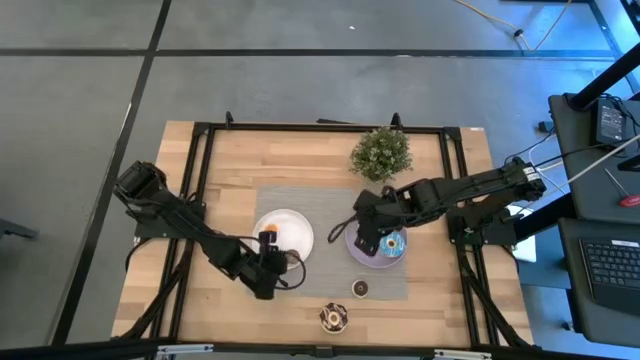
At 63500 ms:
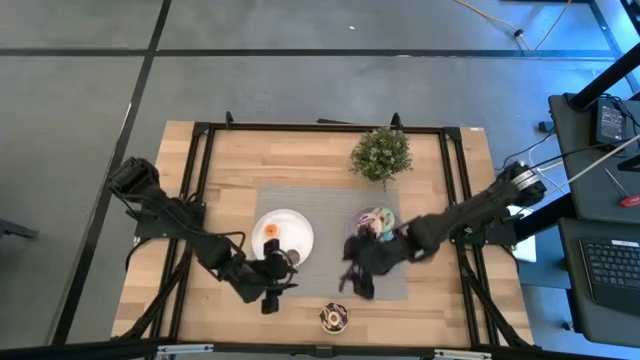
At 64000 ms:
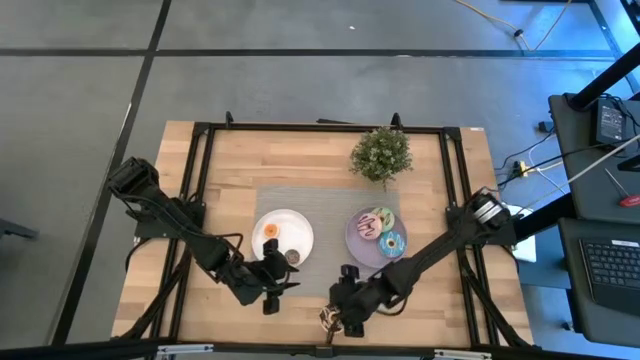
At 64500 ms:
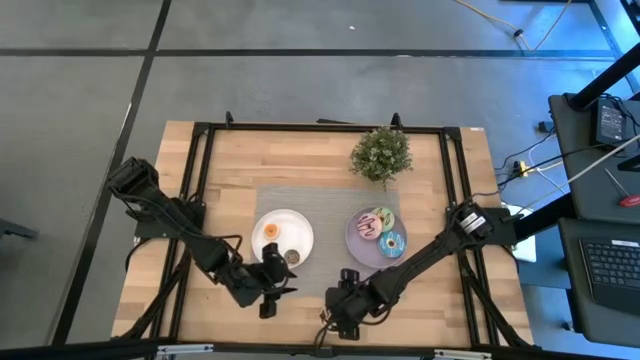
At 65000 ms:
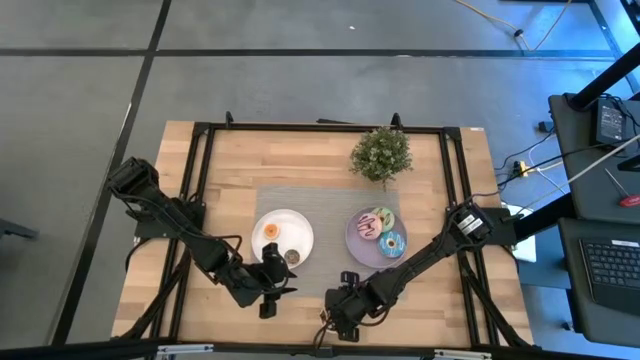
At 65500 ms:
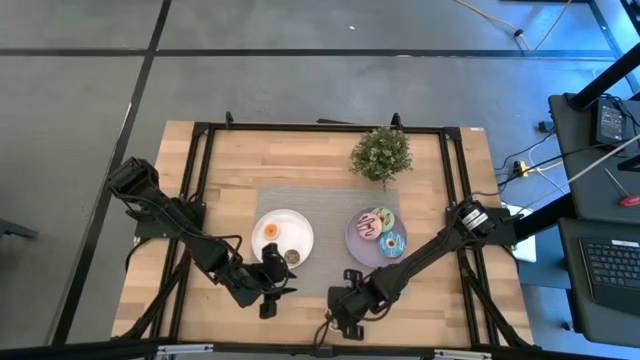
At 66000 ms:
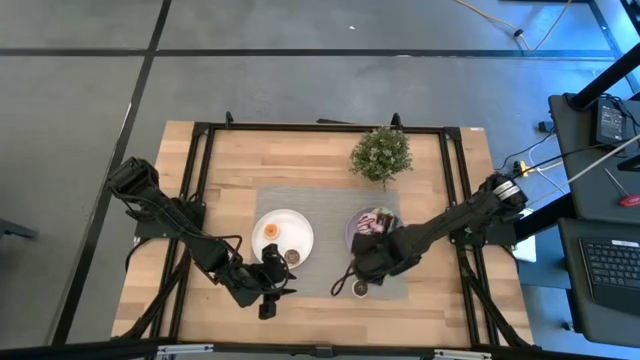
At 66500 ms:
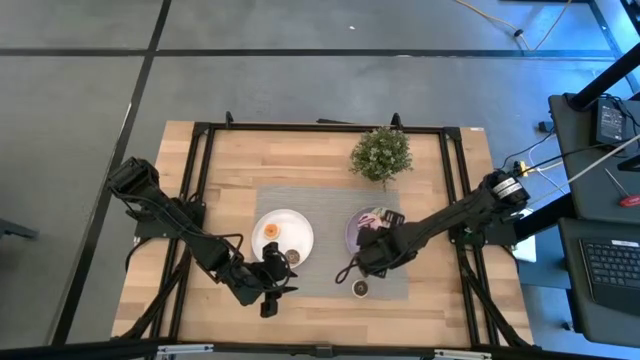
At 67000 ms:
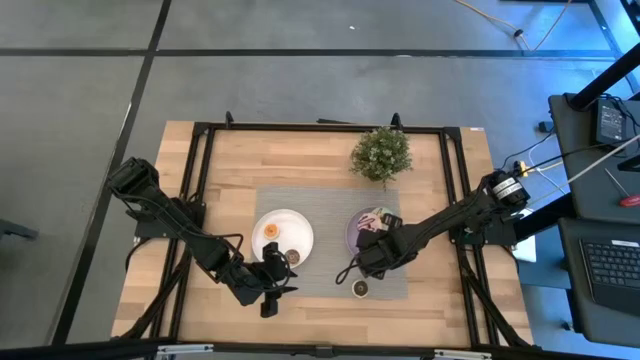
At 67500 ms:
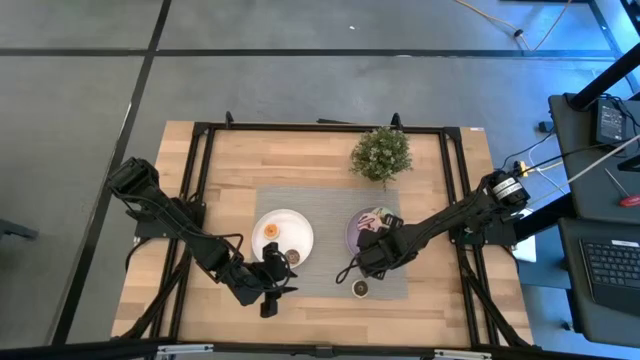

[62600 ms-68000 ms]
Task: Pick & Place donuts
Put the big black donut on the purple plate

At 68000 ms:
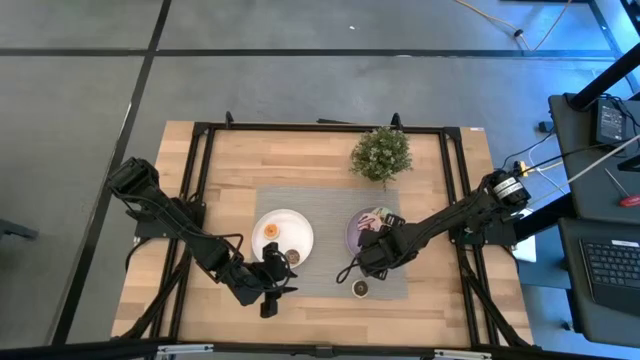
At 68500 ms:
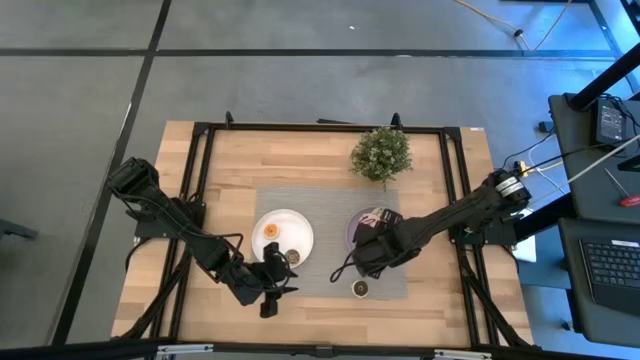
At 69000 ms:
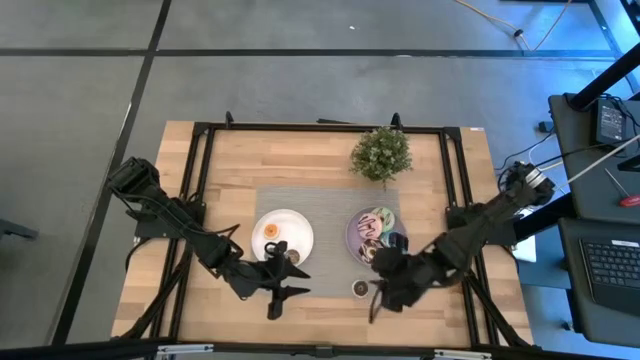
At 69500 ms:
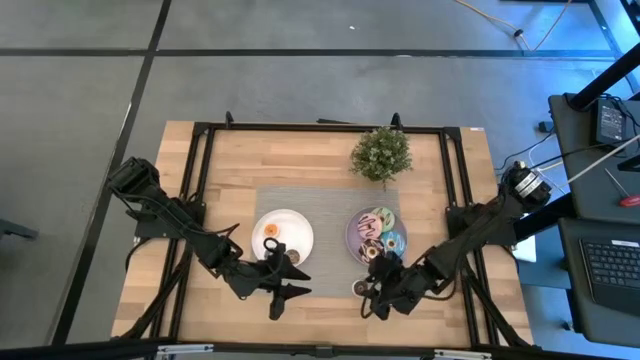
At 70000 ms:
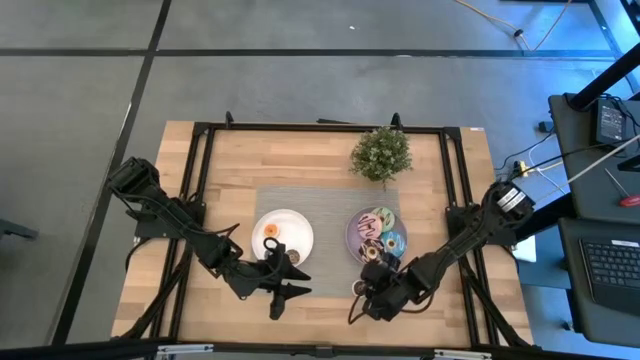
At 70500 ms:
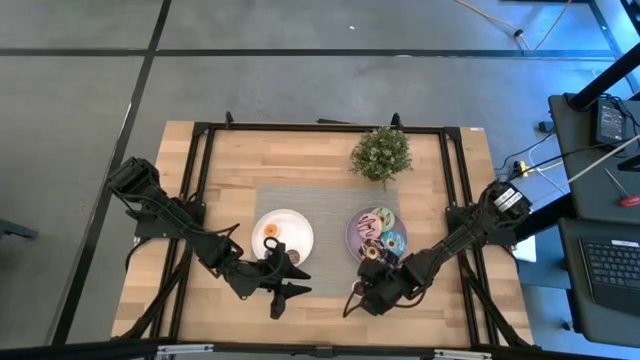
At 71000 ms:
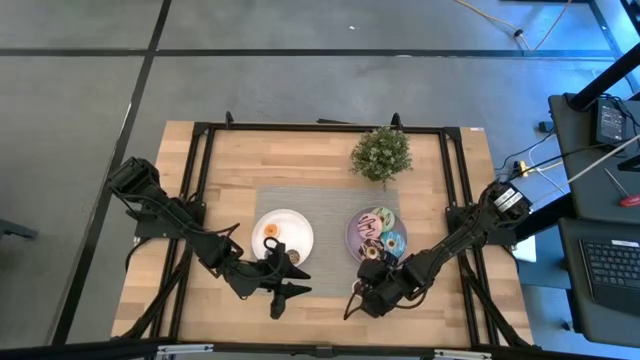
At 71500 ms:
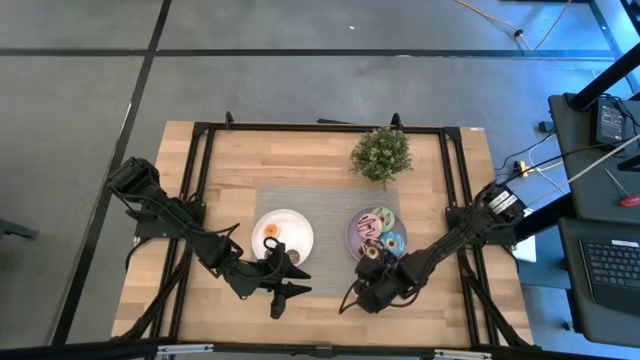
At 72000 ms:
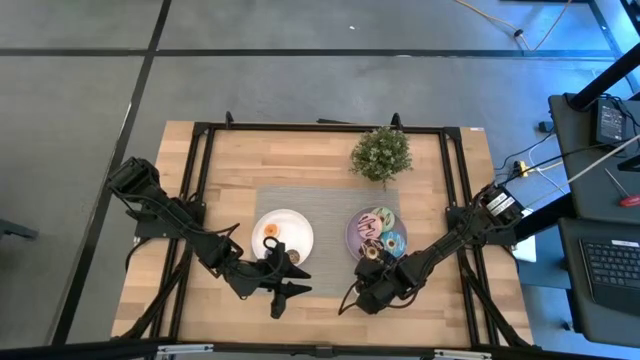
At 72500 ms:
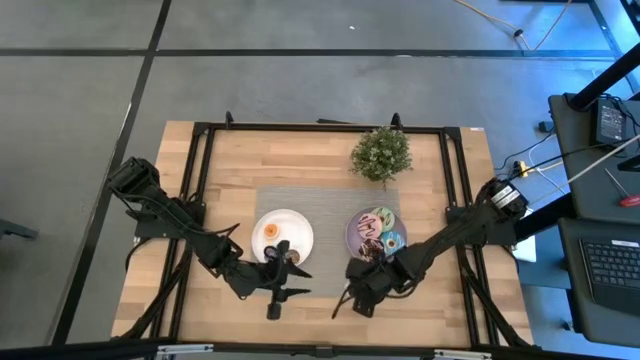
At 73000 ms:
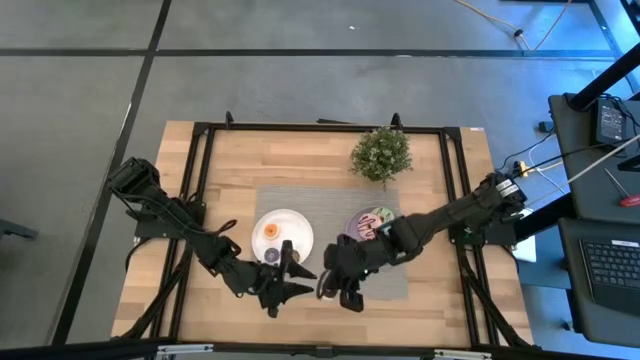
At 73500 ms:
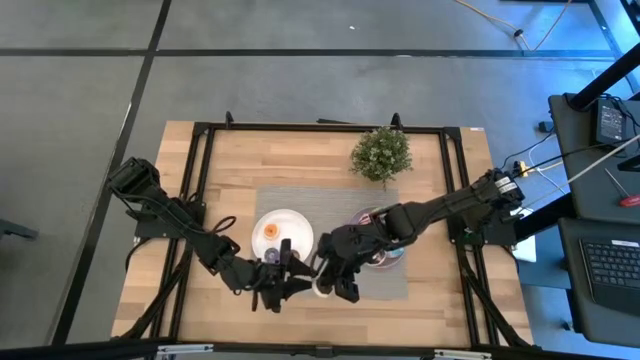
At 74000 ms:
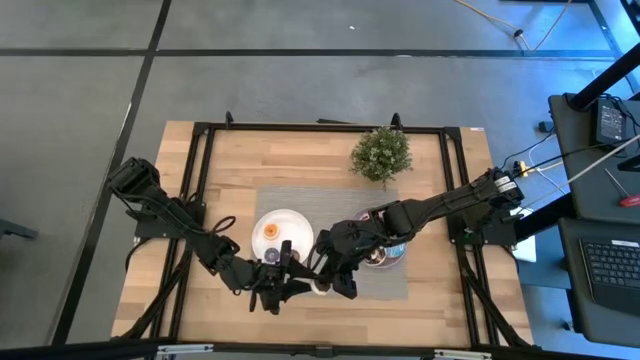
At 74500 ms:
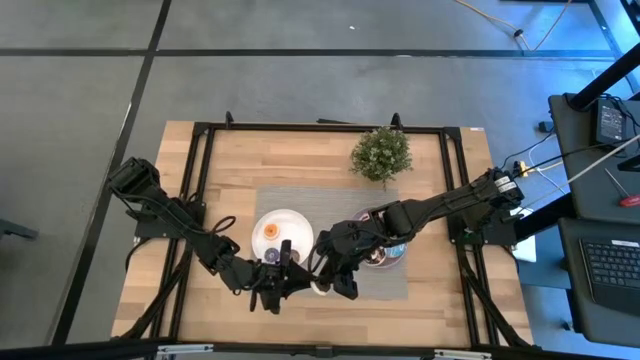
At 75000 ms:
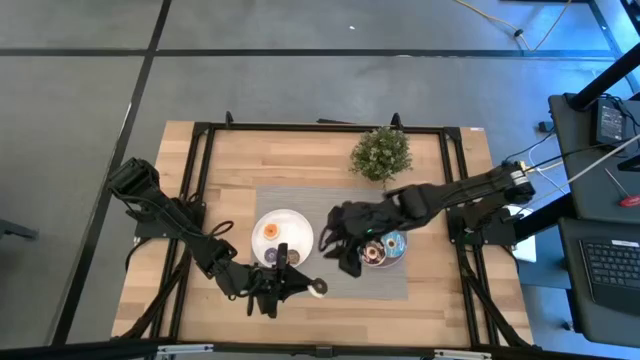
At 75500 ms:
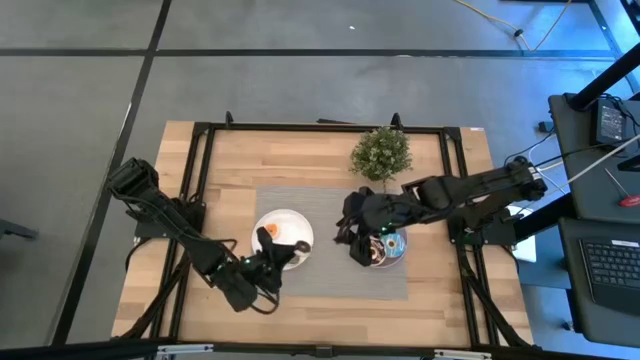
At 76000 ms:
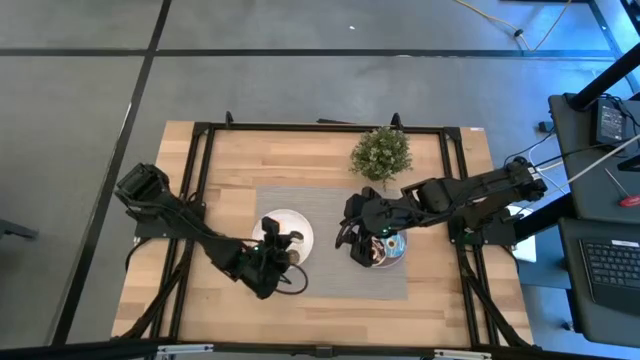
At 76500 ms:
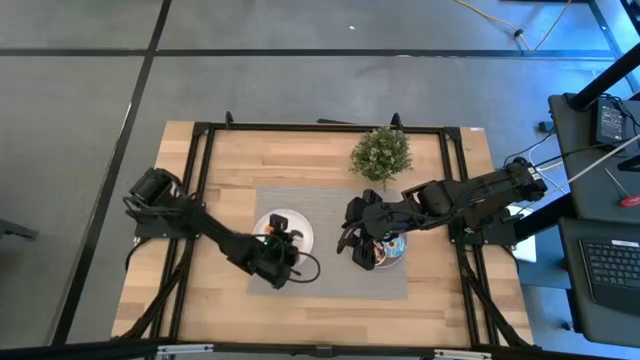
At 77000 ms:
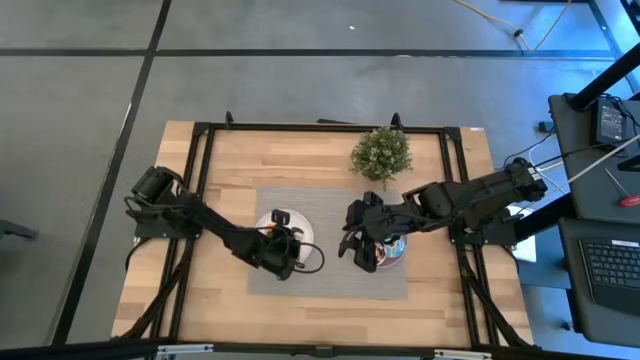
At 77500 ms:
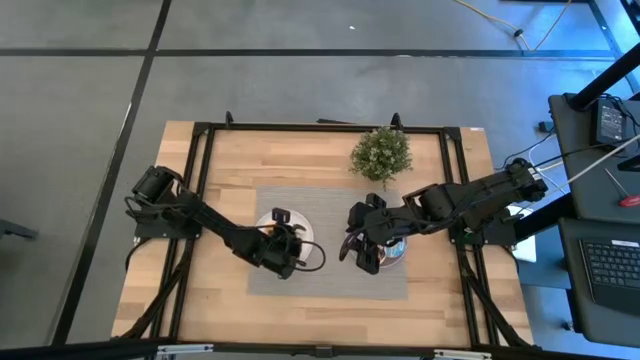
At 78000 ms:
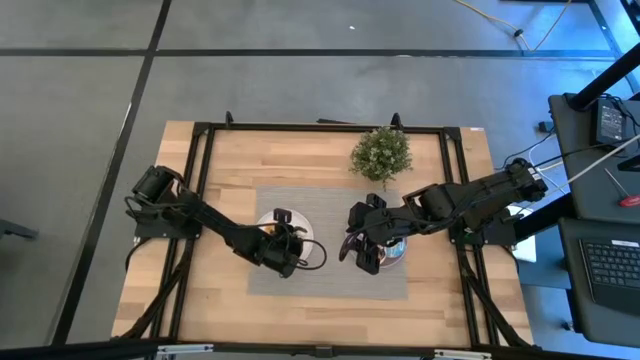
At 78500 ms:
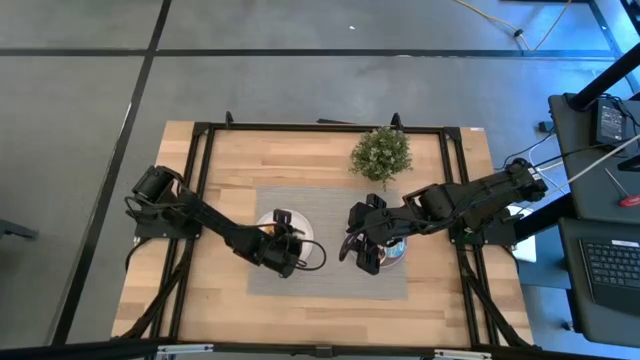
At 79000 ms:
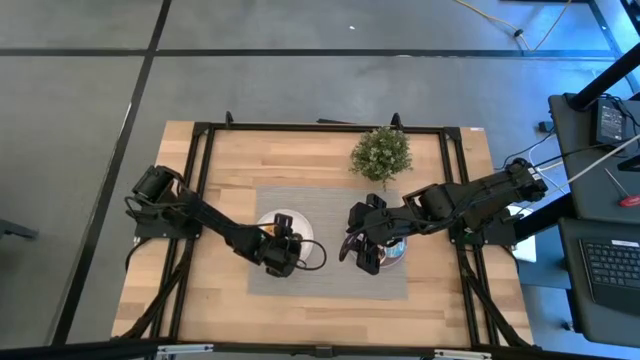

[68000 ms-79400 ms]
Put the small black donut on the white plate

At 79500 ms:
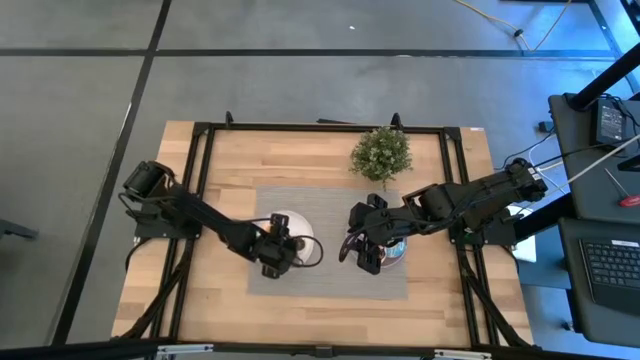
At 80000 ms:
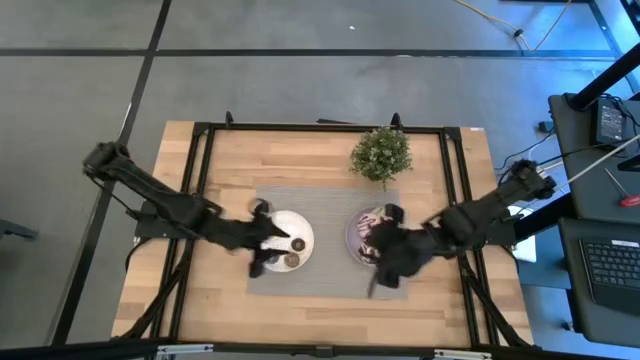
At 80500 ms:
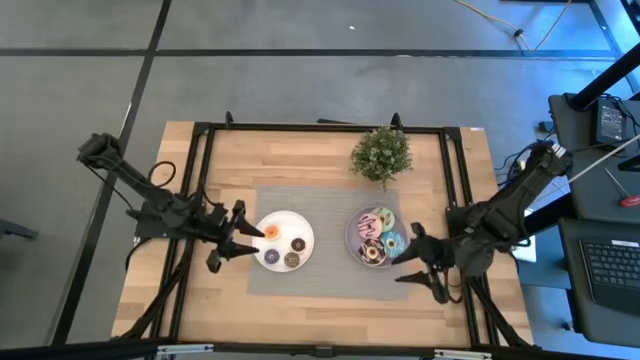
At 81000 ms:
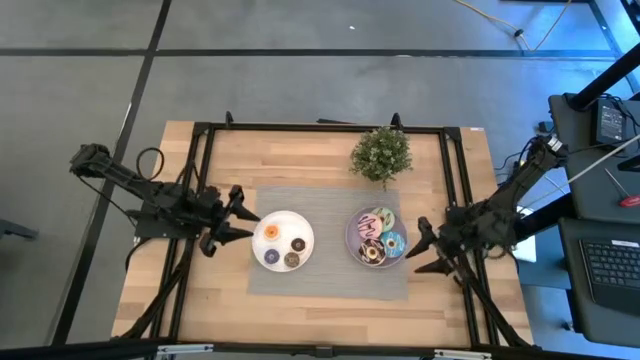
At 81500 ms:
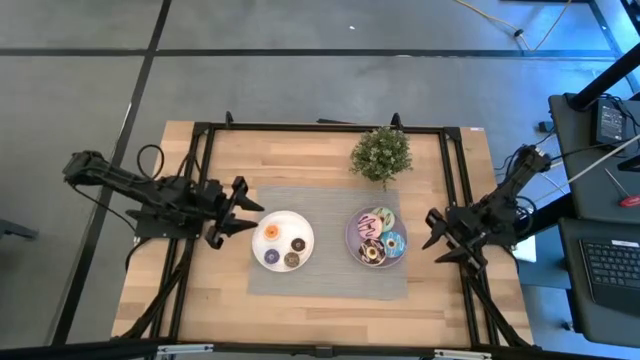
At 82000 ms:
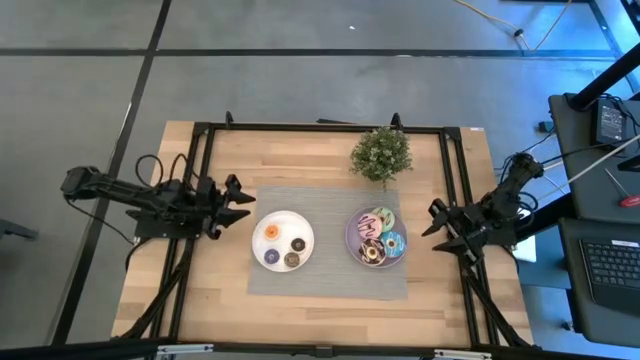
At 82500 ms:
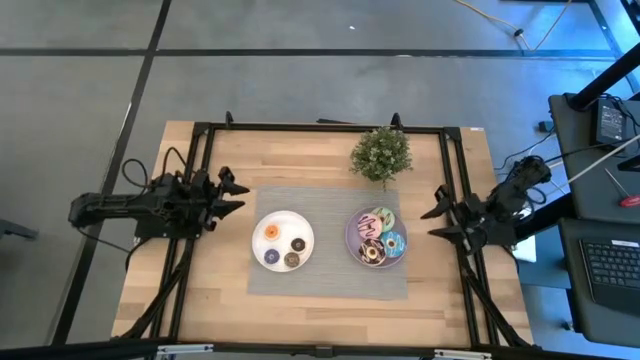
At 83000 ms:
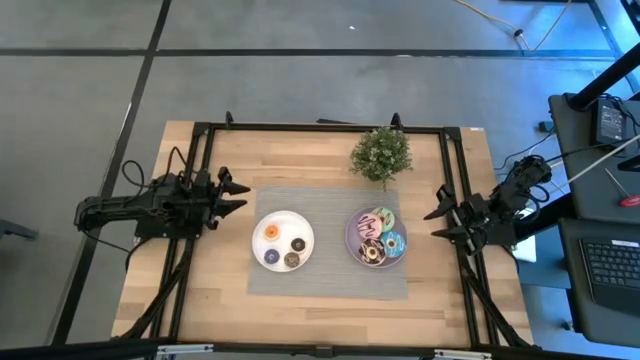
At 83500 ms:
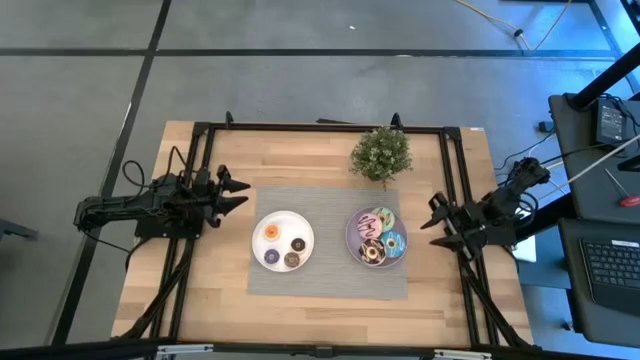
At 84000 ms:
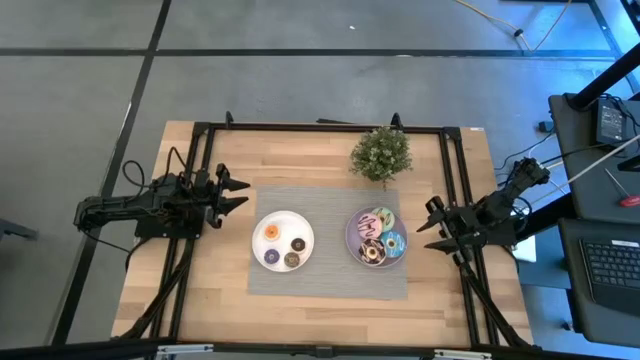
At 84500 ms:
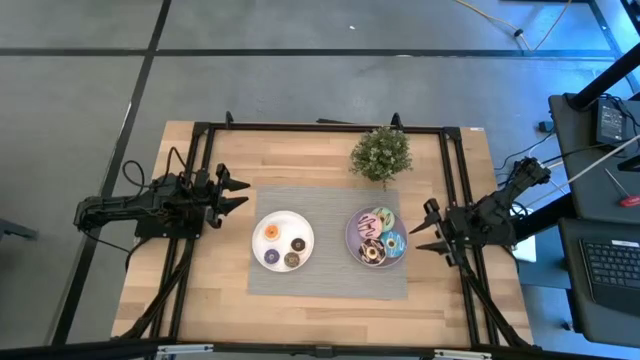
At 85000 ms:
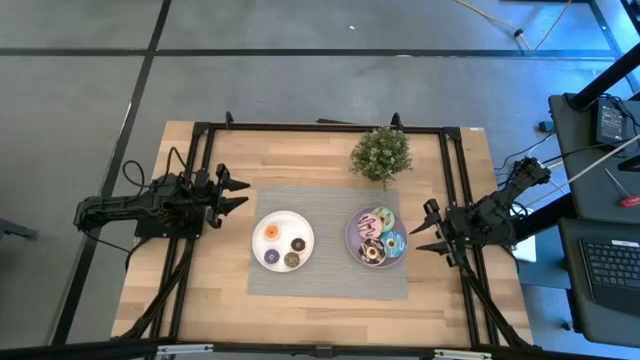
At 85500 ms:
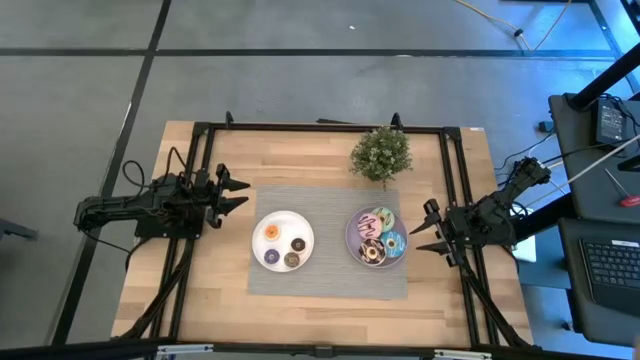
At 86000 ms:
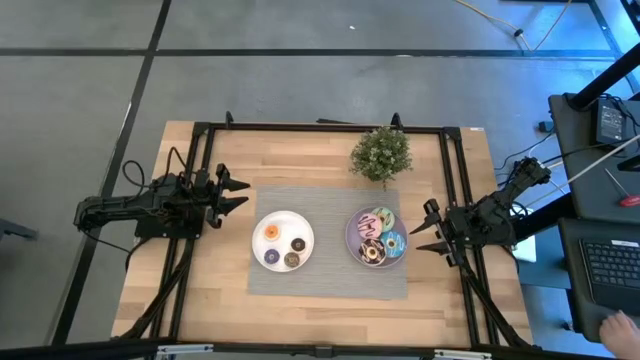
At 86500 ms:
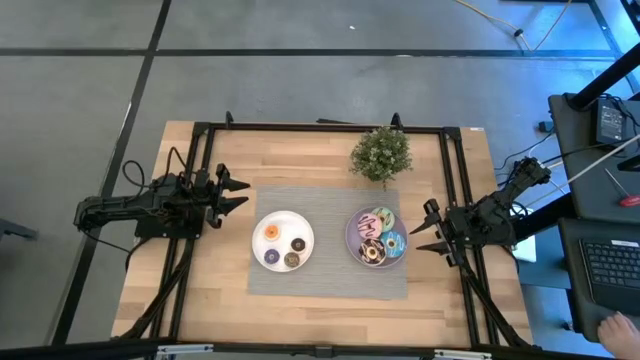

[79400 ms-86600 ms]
Return to Home Position
